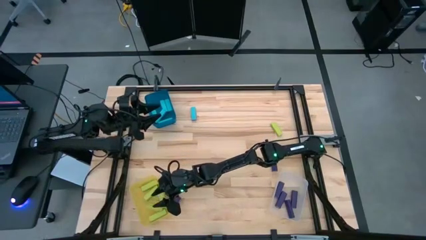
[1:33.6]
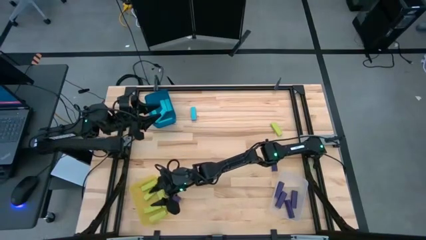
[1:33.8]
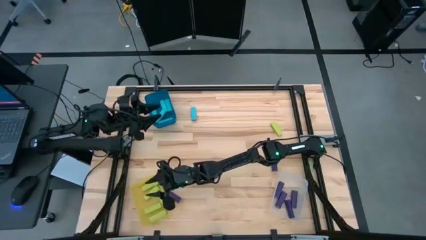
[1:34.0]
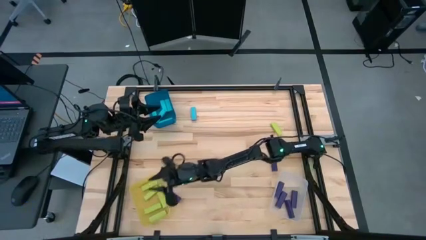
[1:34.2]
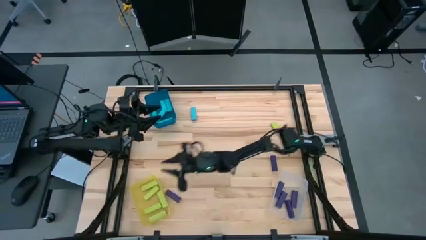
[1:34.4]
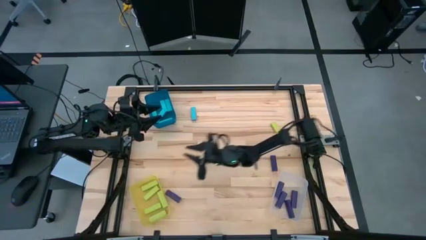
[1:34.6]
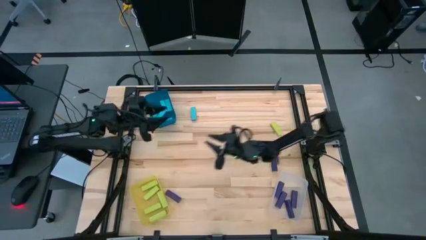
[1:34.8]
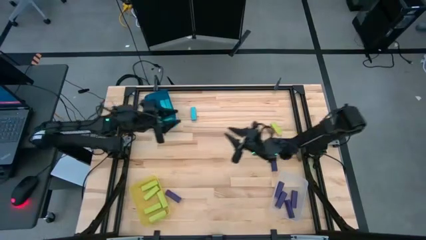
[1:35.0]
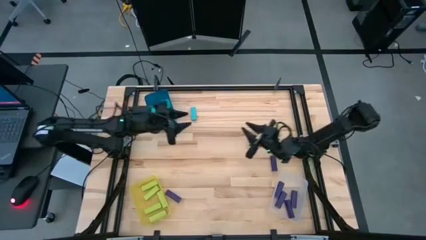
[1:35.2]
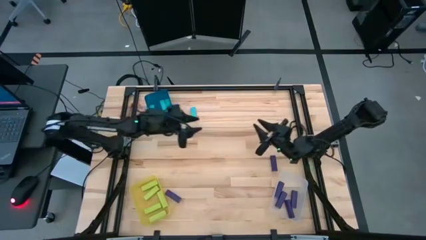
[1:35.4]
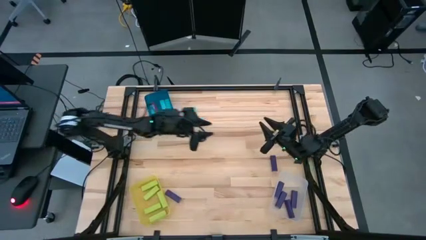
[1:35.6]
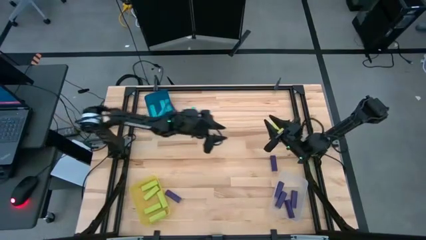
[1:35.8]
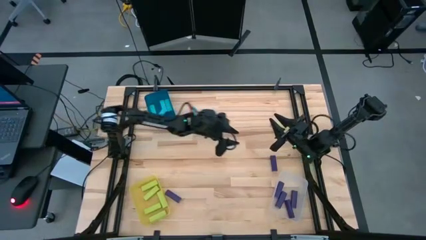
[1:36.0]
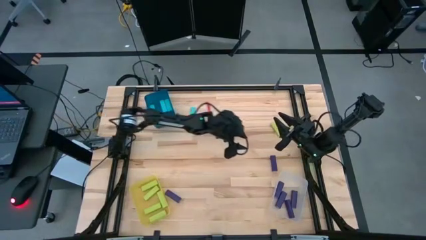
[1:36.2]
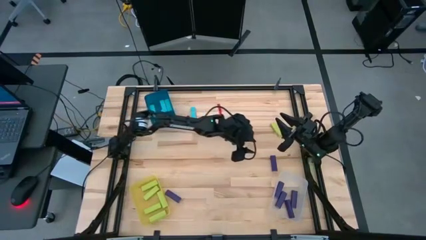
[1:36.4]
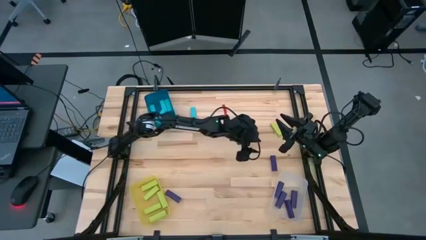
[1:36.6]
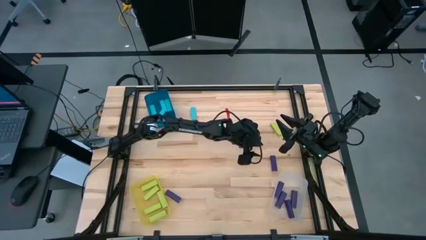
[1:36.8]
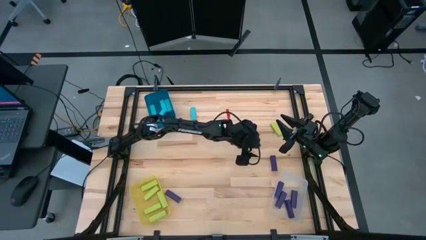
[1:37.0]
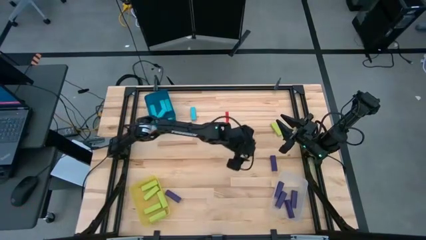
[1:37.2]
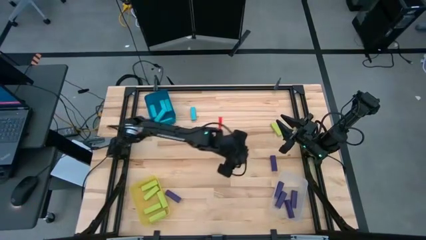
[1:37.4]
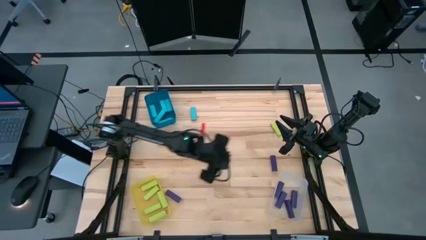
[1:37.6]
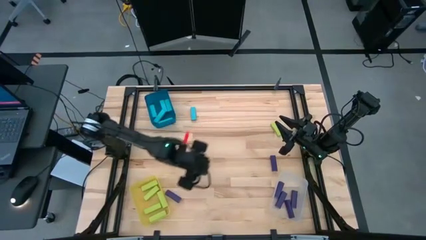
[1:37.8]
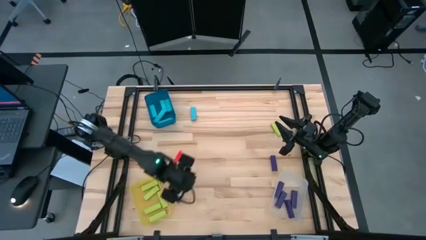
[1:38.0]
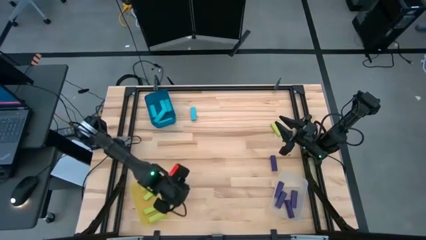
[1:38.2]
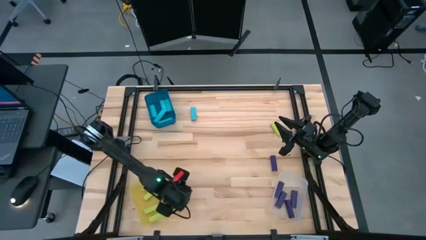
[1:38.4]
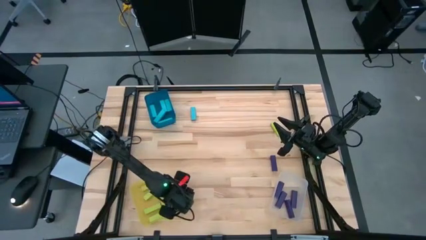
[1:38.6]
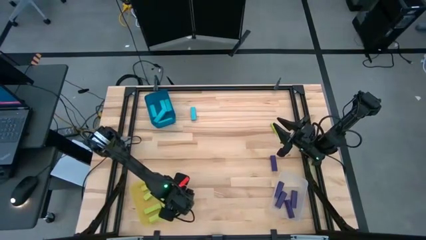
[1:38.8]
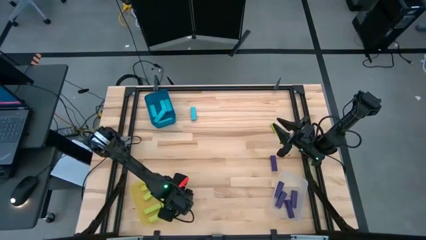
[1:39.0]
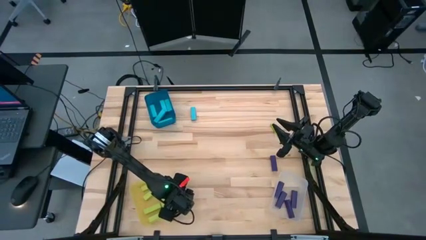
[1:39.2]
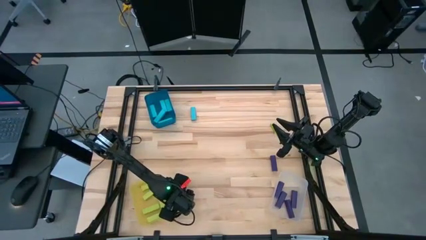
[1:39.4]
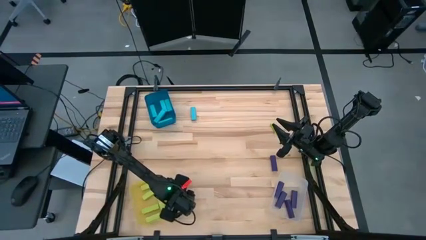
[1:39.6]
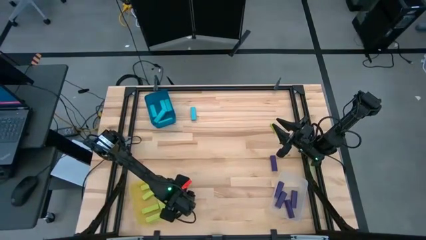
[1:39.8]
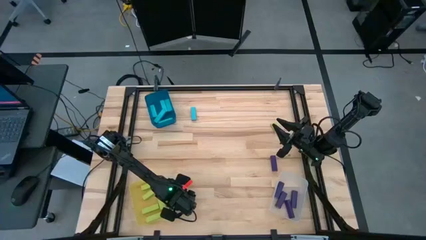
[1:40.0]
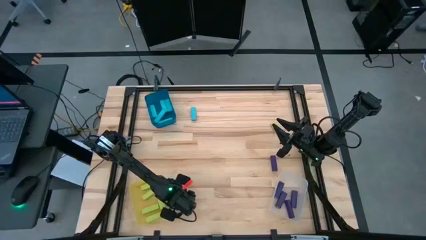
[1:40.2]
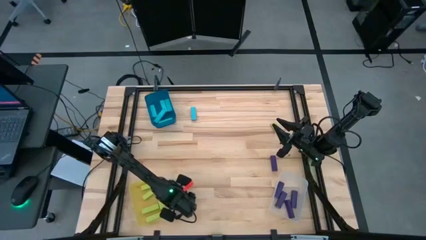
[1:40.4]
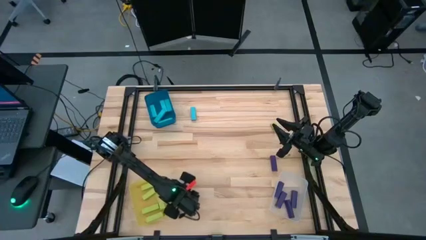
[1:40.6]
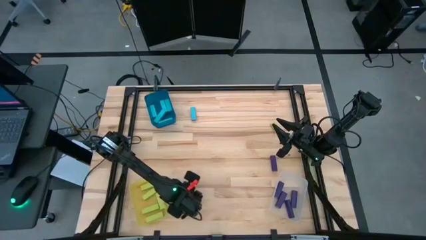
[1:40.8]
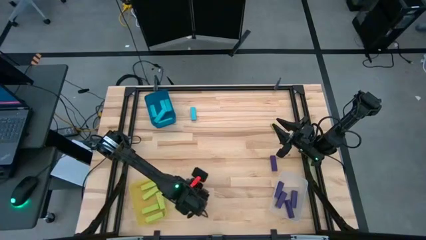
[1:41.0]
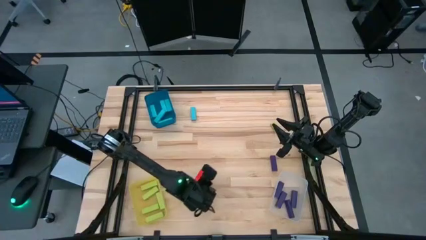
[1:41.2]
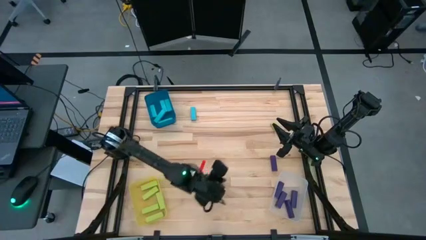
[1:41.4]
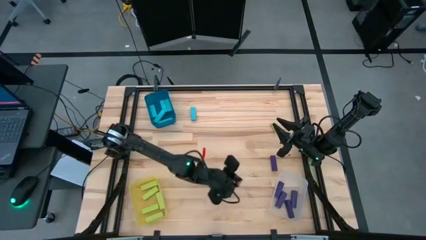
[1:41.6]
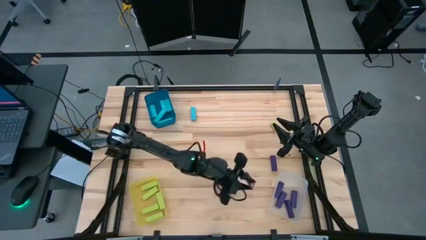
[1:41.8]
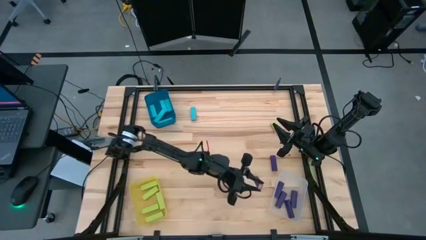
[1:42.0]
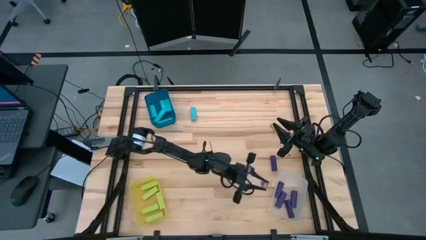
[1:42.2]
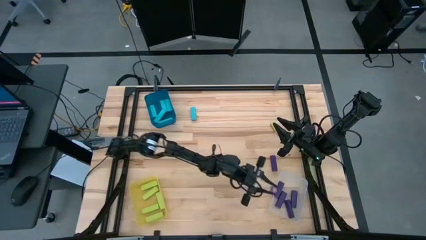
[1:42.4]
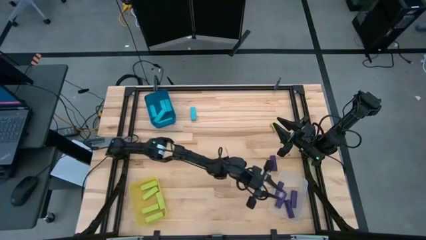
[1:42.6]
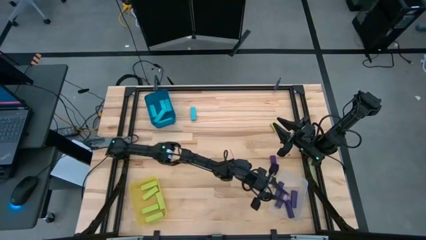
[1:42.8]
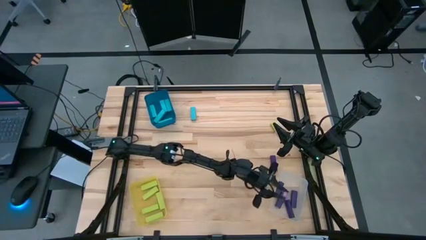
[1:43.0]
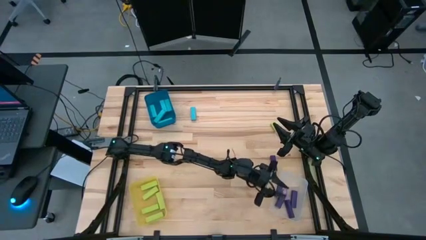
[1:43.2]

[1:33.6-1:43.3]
Task: Sort blocks
Put the purple block into the transparent bin

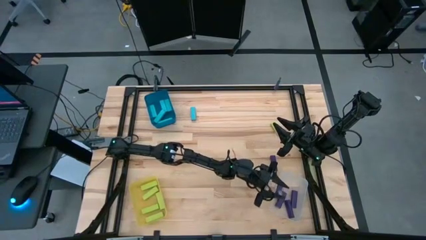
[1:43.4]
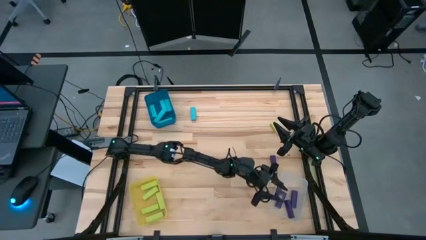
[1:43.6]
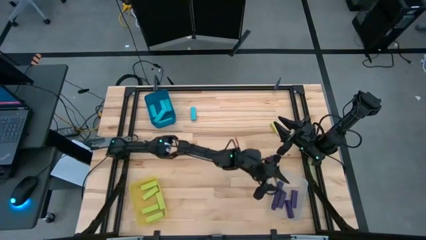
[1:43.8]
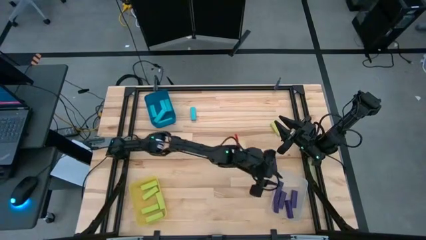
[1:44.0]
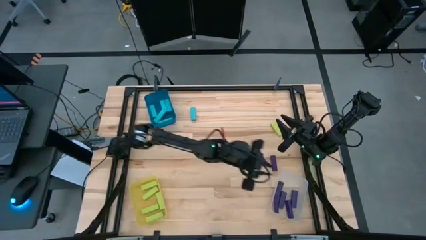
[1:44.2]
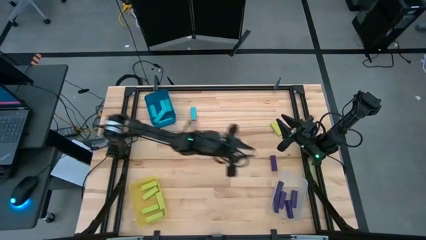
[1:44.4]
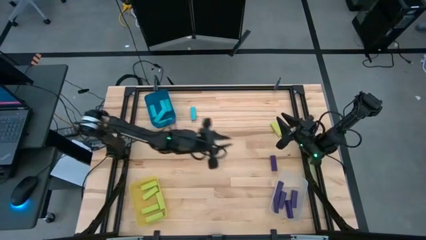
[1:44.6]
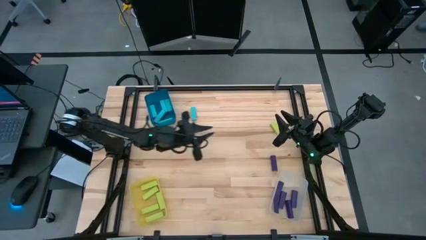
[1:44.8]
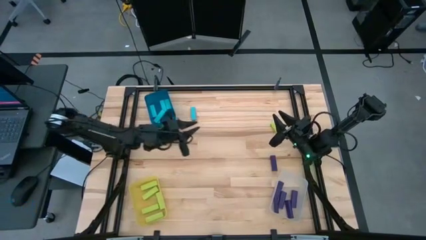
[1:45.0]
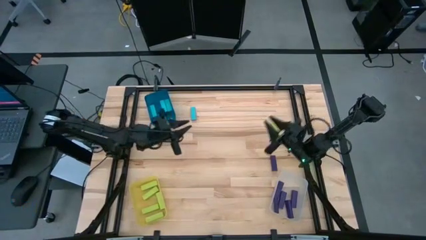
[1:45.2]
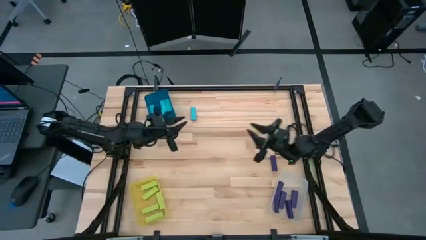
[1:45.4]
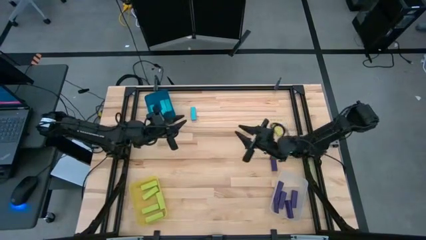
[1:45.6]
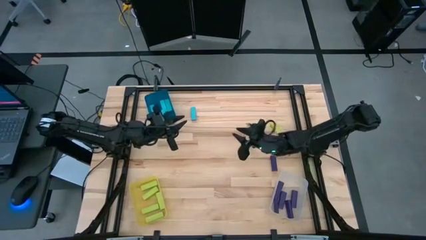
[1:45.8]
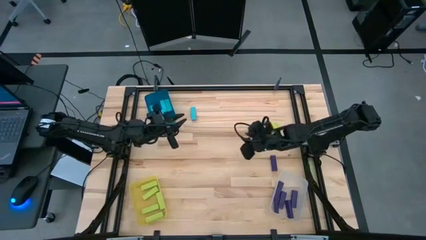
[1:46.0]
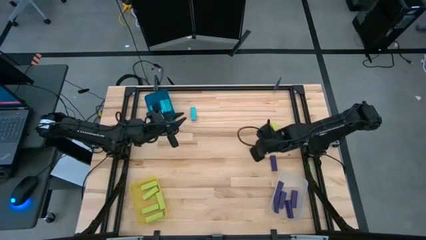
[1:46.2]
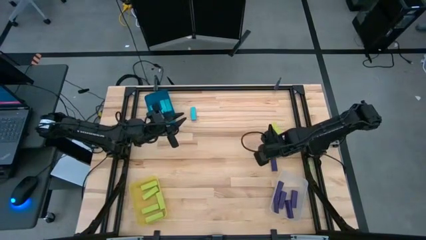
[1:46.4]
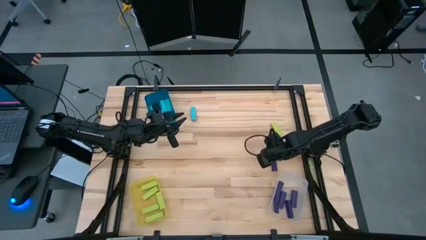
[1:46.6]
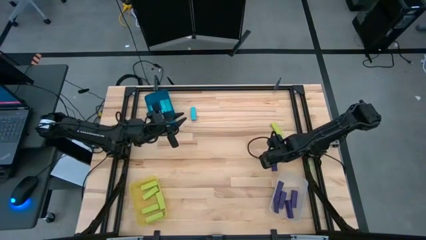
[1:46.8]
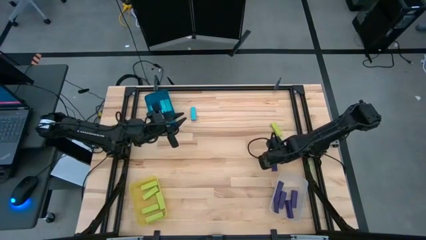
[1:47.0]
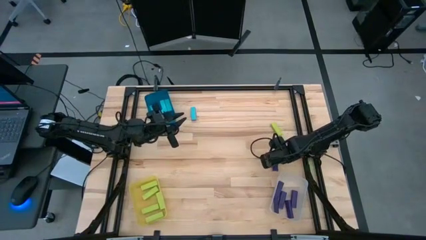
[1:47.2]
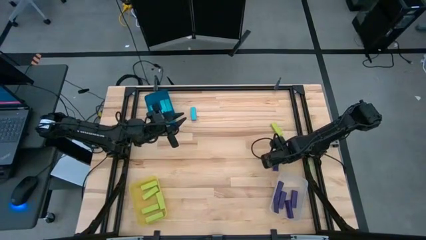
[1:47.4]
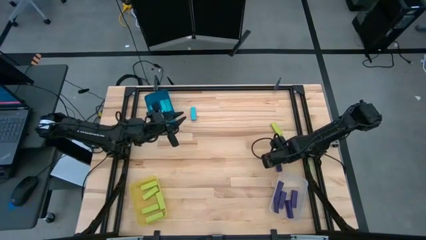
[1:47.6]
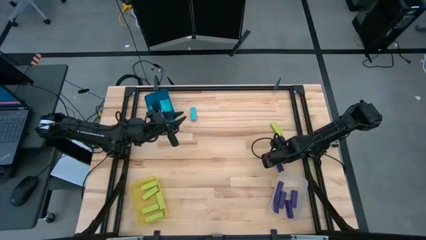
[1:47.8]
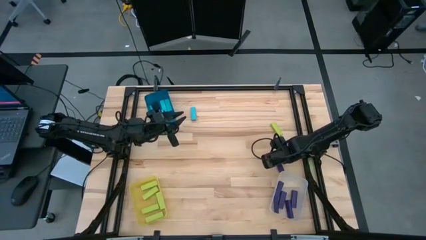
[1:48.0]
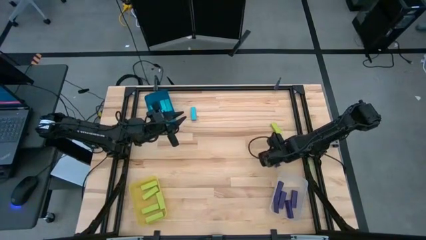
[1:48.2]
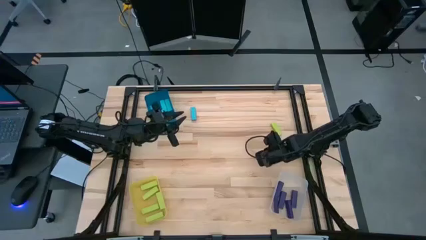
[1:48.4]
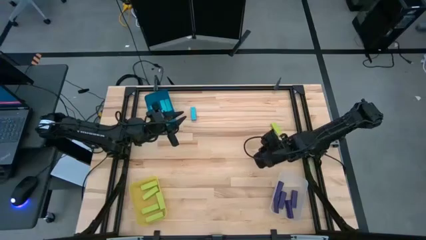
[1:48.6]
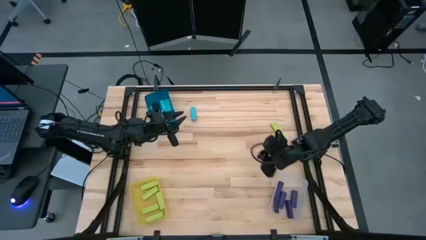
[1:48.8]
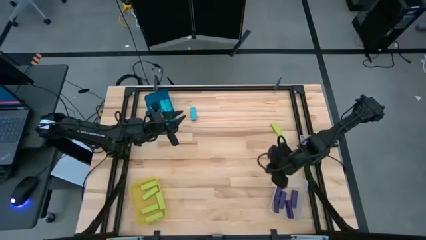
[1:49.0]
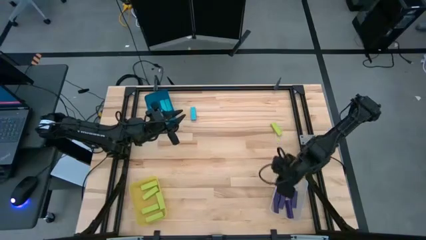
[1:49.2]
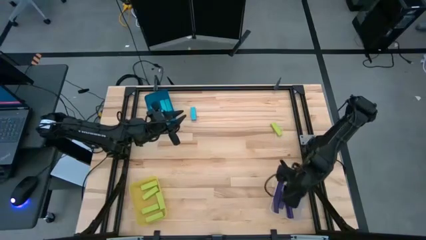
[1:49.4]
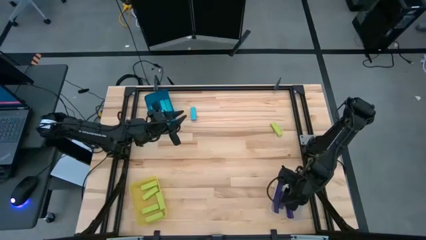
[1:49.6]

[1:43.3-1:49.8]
Put the purple block into the transparent bin
